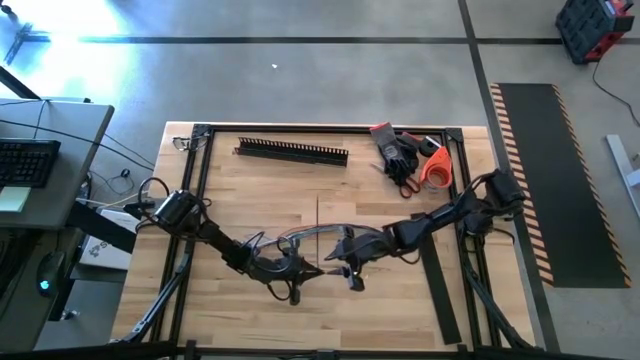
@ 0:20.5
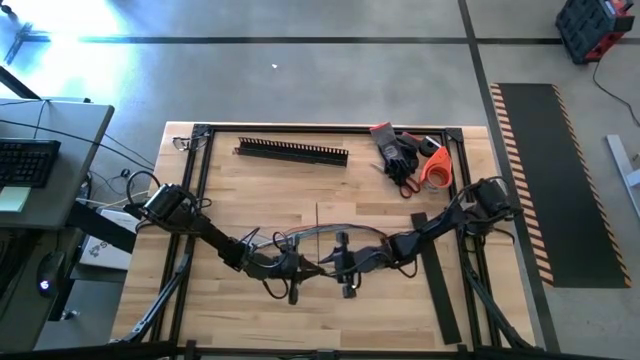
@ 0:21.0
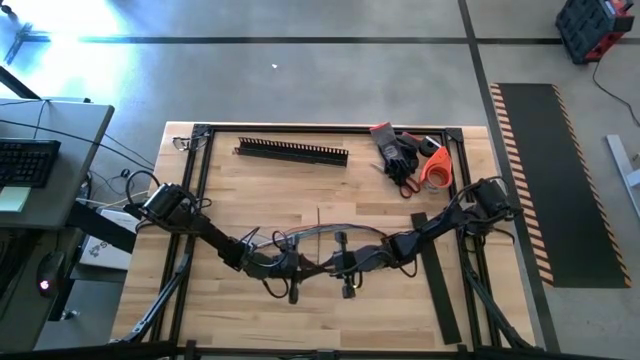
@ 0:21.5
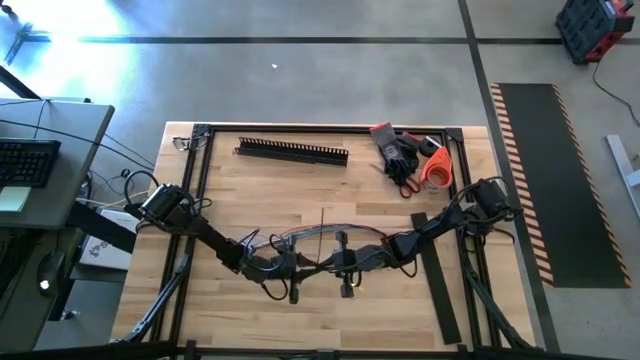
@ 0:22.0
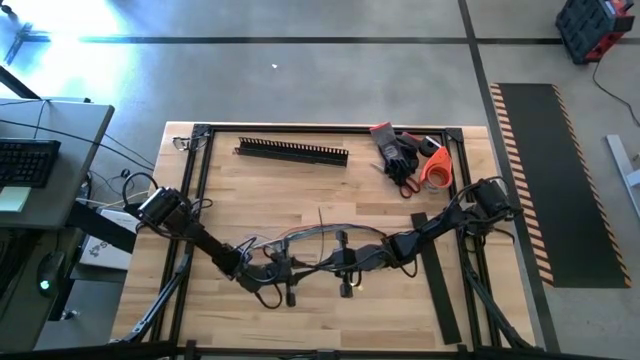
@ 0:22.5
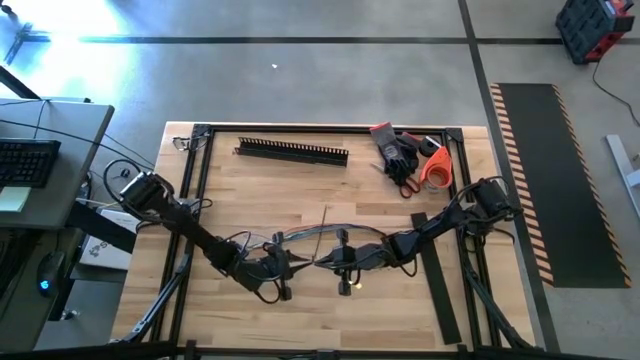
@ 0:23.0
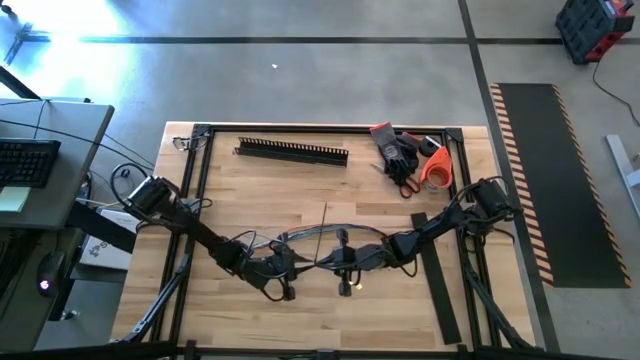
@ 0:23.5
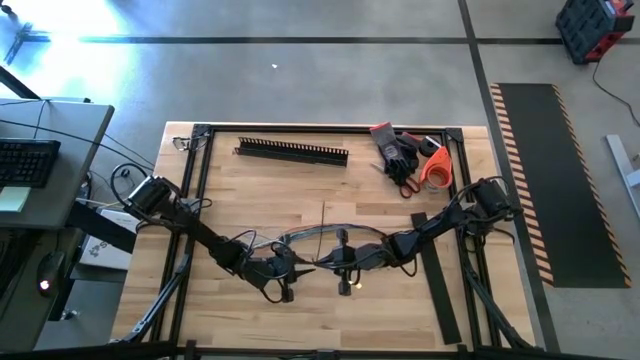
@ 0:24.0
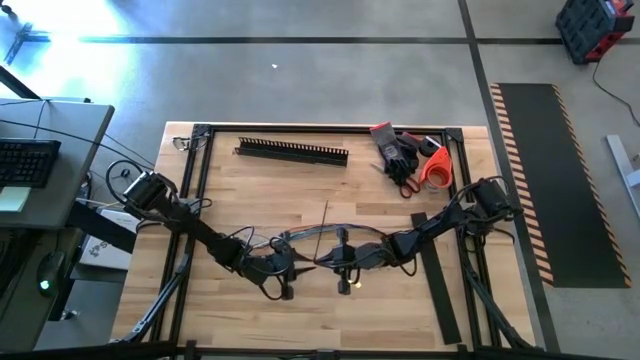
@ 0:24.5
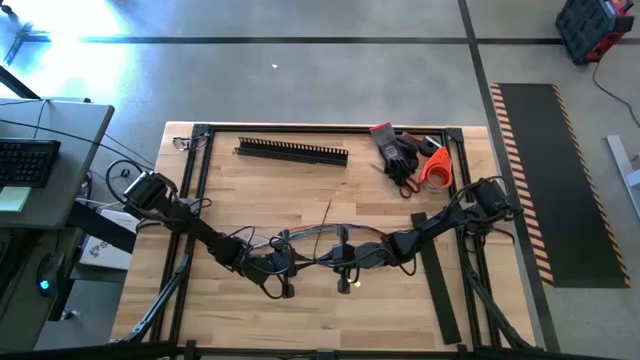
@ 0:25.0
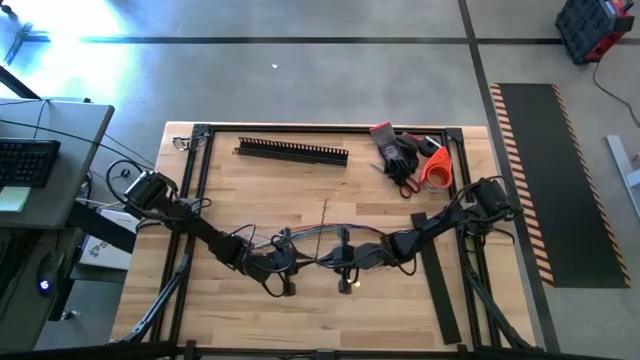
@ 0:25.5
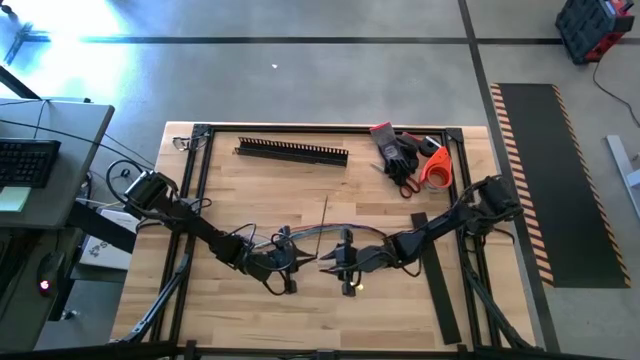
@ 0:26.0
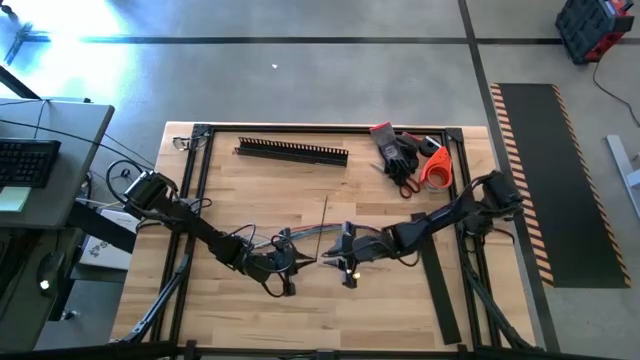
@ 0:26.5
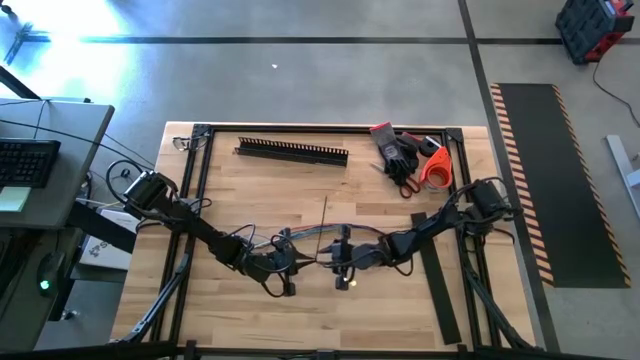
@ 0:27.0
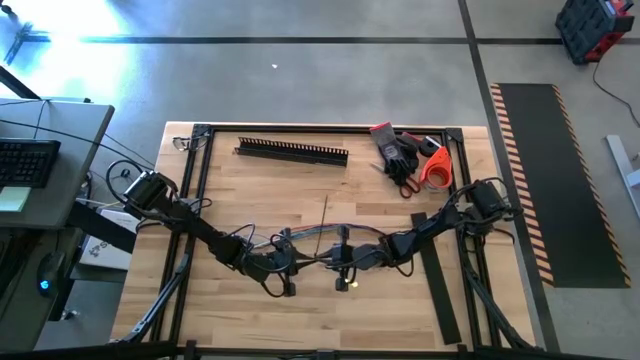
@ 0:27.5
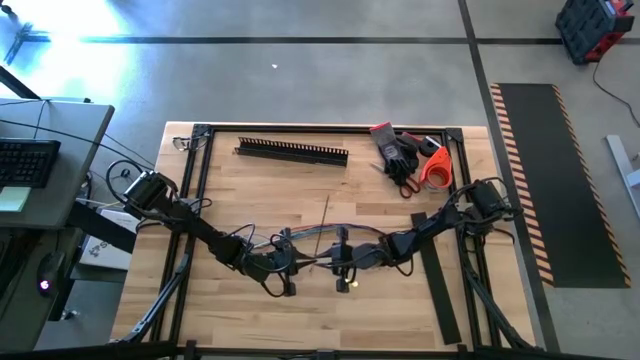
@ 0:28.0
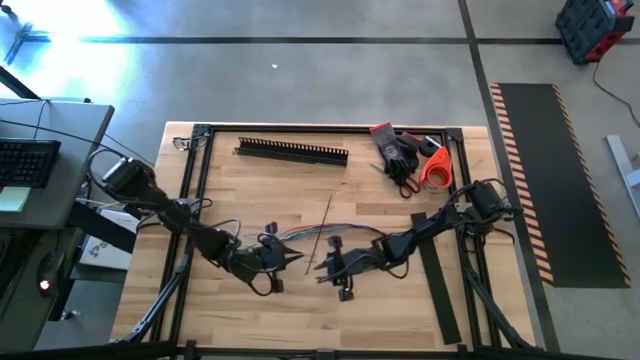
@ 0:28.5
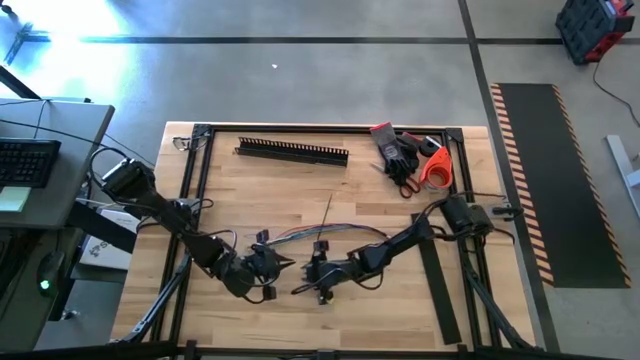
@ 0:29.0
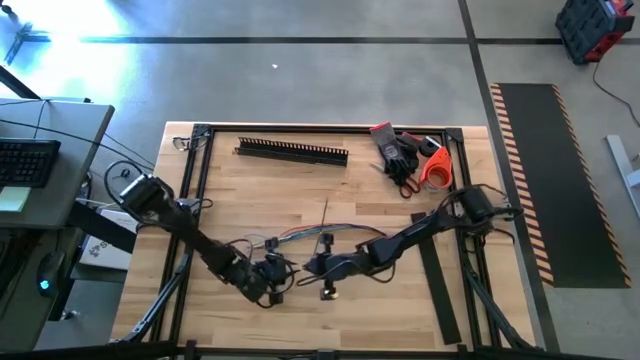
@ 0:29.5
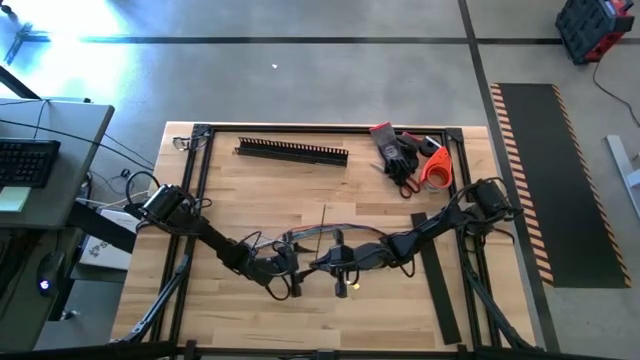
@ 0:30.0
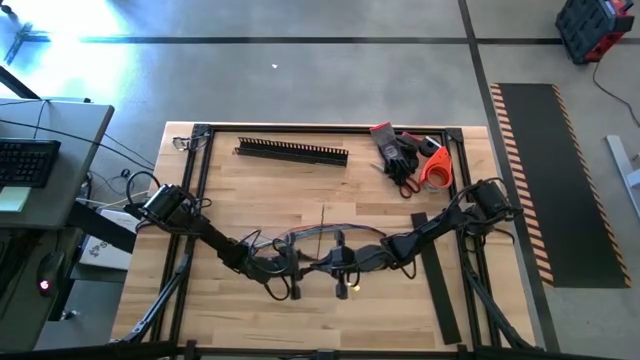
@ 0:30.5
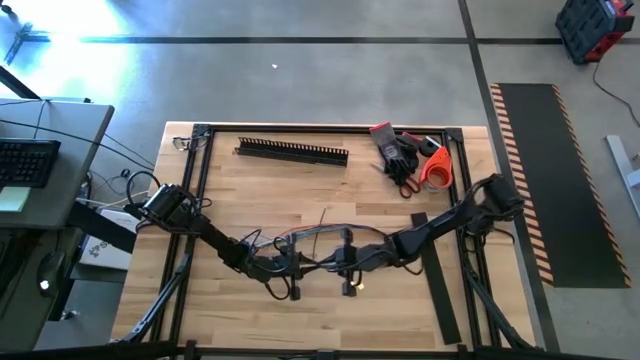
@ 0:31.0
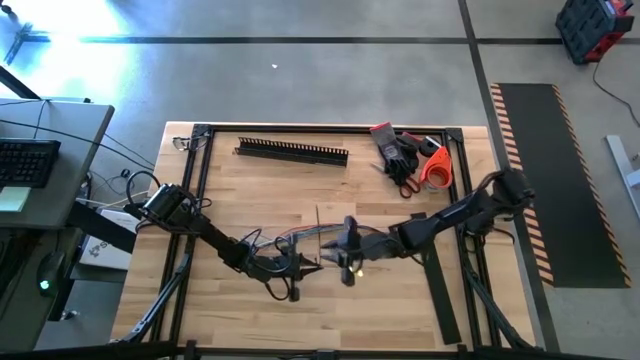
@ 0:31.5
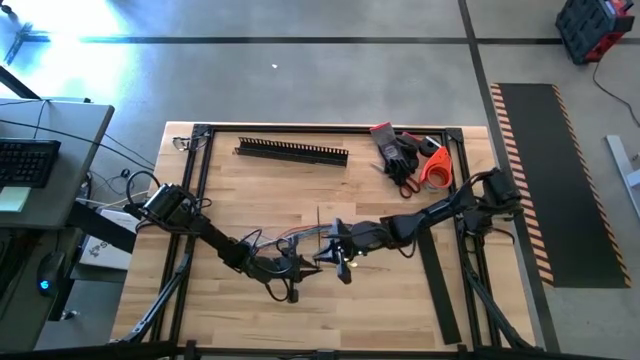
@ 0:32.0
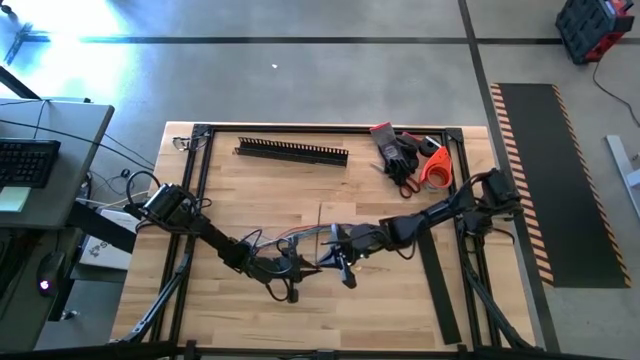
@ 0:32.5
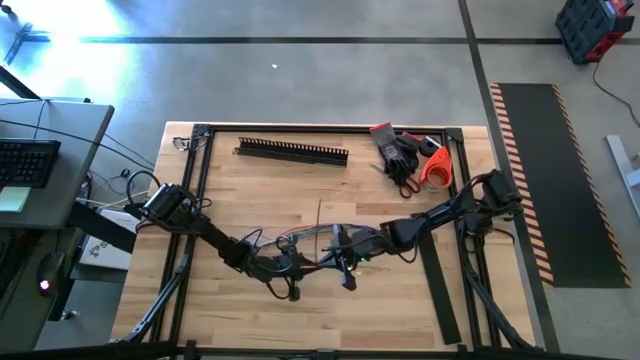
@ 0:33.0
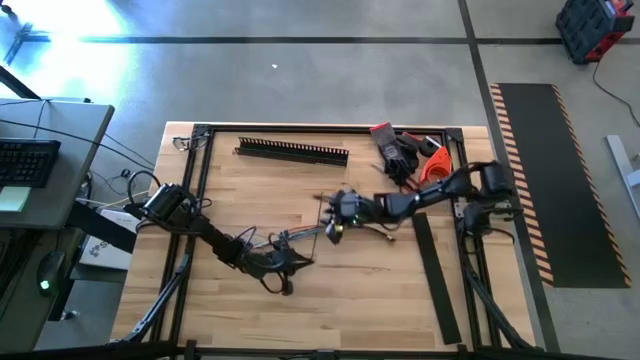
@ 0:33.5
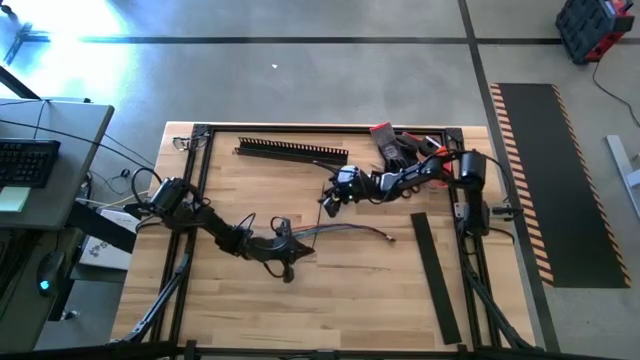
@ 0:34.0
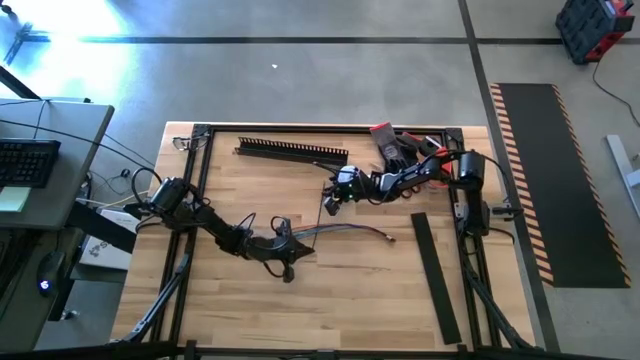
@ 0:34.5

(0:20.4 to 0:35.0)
Task: Ziptie cables
Wrap the black zip tie around the cables
